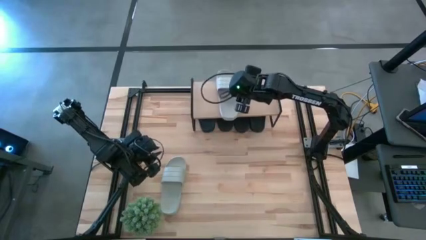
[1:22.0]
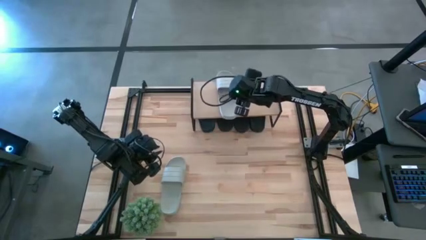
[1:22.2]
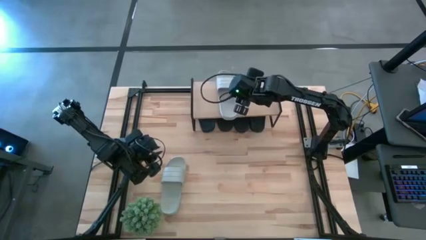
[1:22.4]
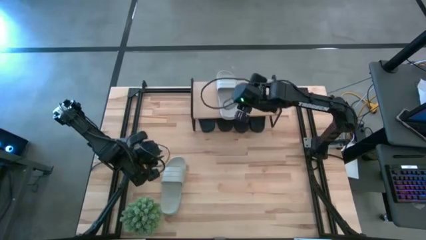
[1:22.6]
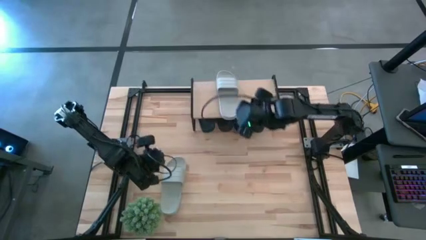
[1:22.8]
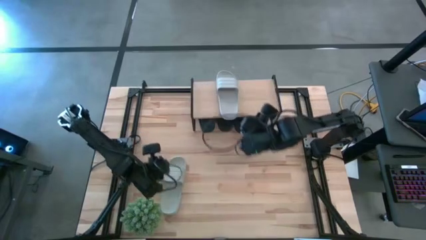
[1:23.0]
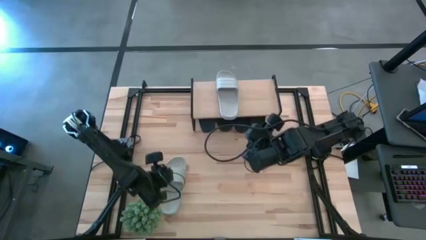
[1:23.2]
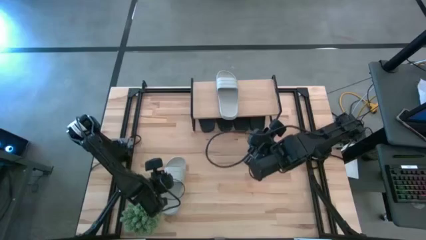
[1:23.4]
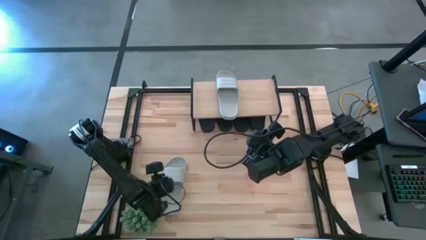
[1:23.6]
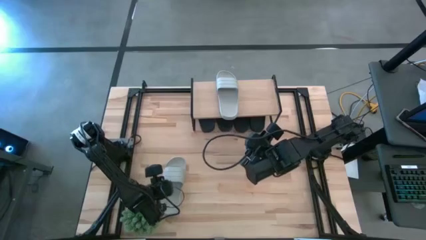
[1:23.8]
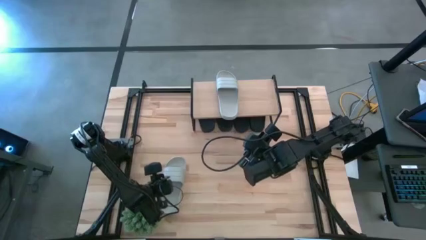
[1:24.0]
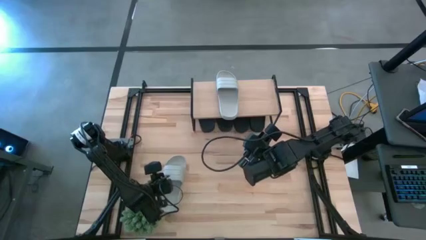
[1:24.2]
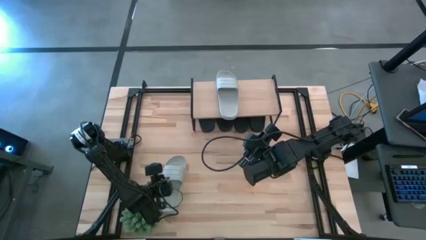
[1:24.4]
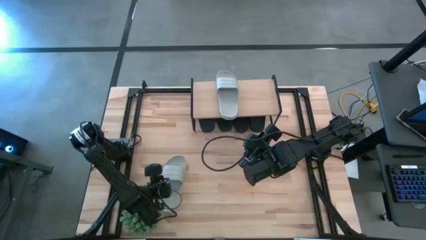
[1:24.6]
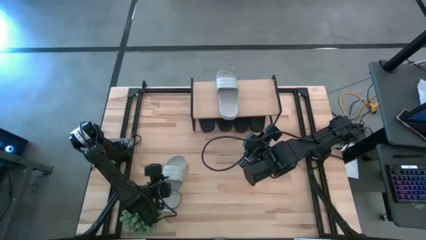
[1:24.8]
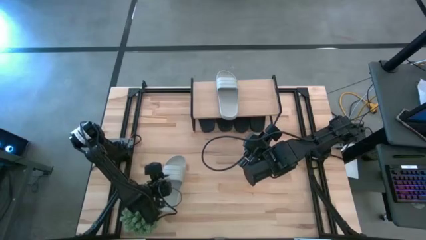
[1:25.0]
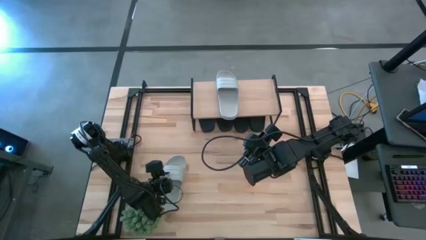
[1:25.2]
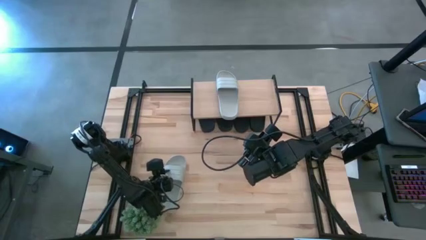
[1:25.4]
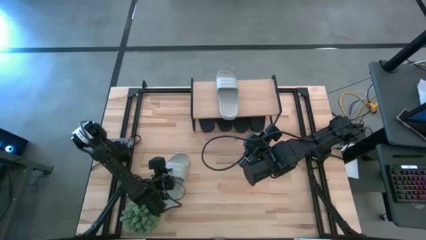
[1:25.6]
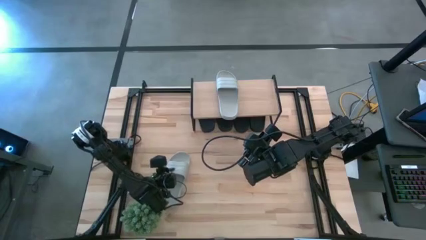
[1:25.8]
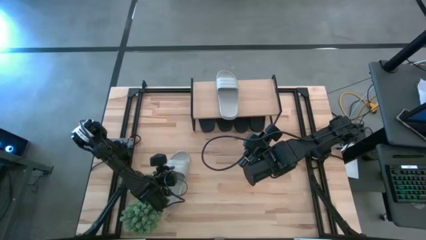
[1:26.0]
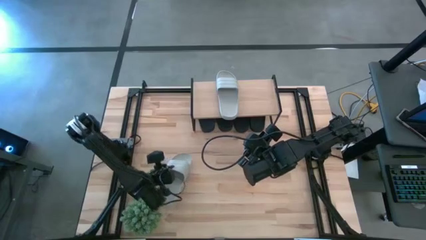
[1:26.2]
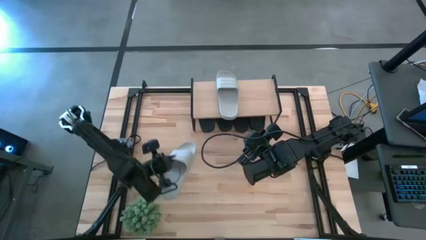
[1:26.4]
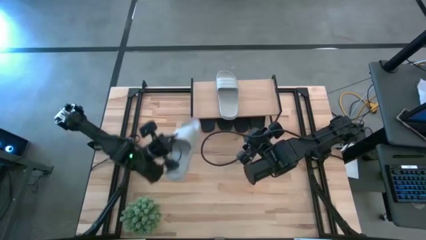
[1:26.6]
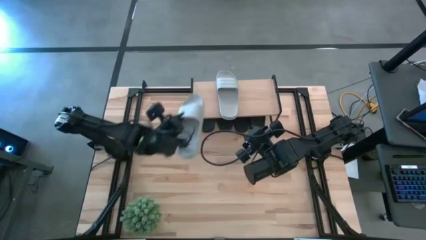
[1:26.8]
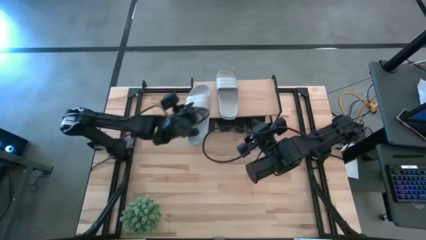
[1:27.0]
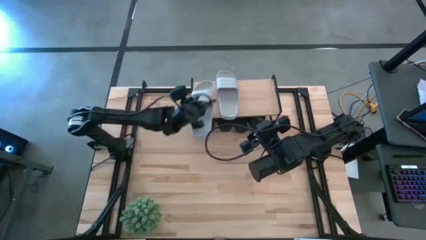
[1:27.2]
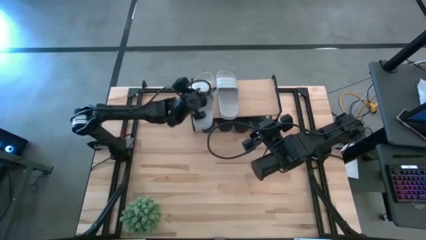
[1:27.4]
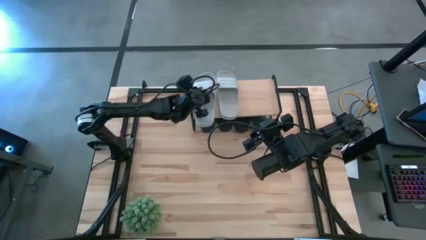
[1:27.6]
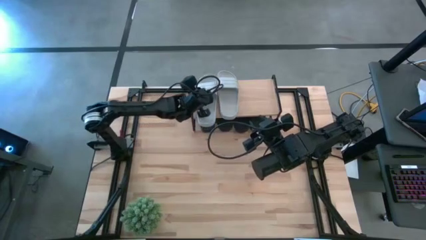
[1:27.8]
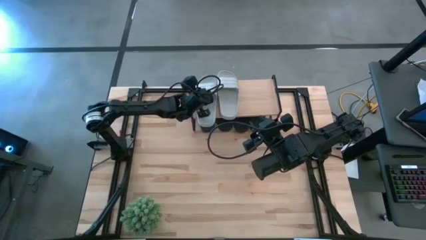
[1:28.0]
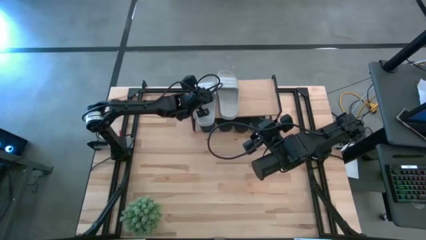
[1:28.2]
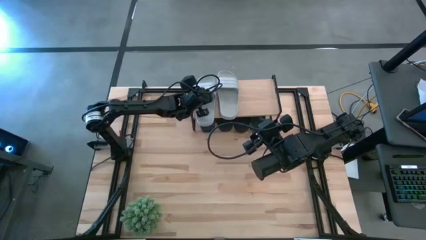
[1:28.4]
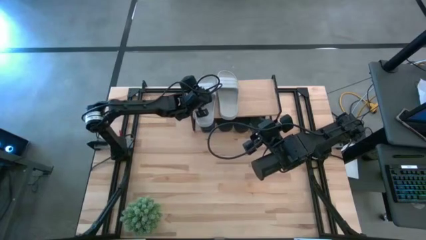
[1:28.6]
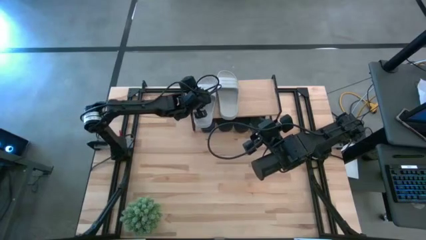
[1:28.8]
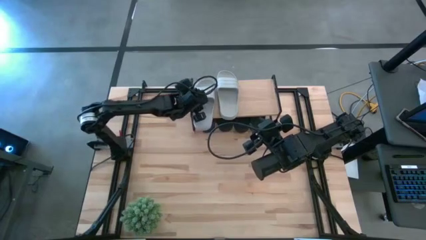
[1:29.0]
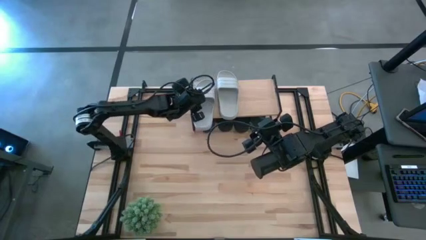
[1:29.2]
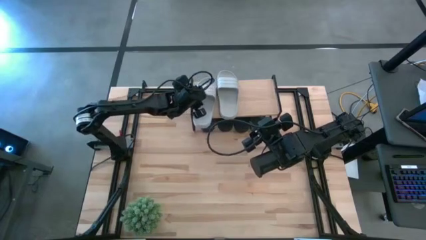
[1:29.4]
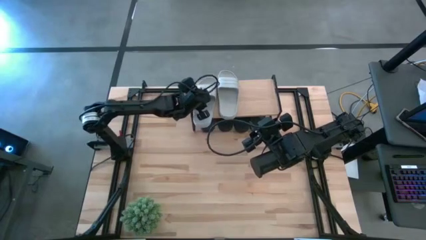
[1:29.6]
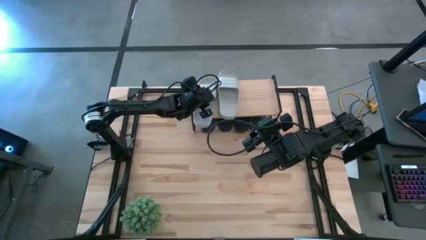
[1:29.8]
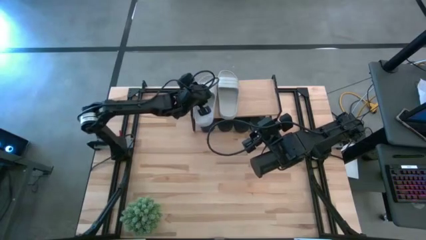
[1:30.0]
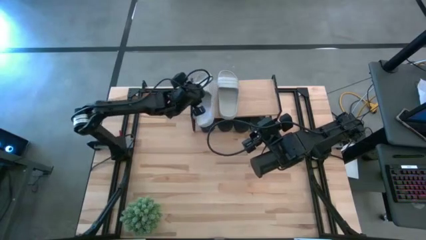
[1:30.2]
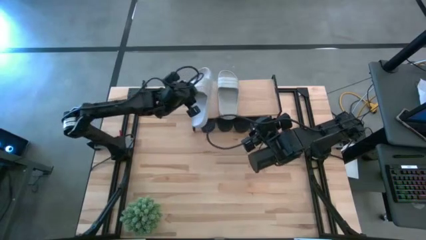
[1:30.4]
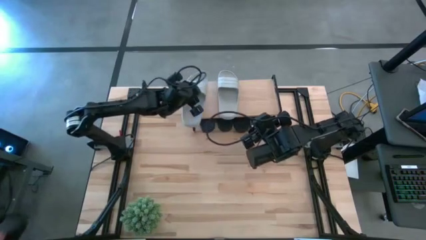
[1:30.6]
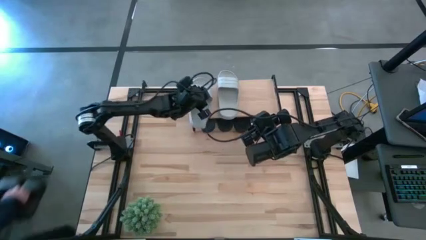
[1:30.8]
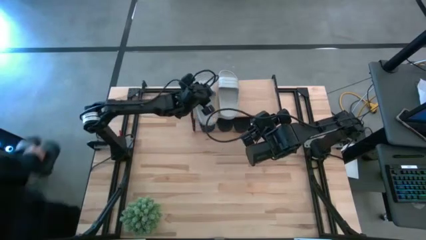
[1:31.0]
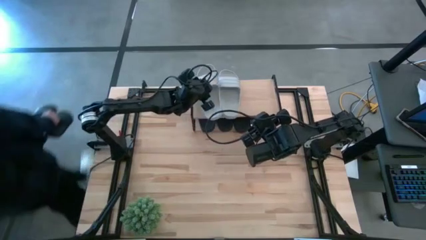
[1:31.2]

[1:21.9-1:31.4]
Task: Pick and place slides into the shelf
Put the gray slide on the shelf

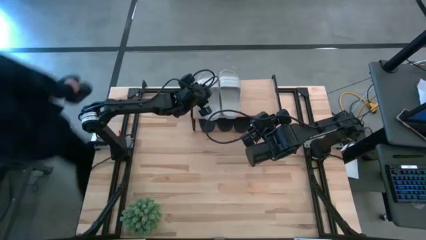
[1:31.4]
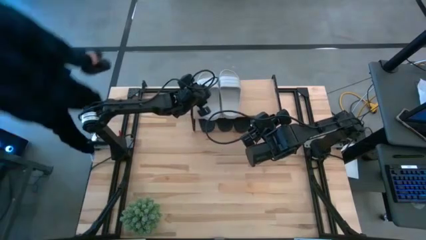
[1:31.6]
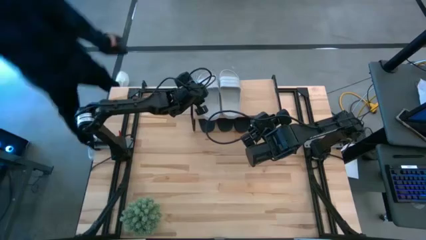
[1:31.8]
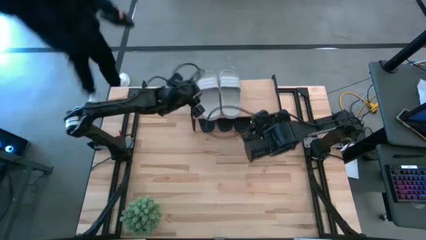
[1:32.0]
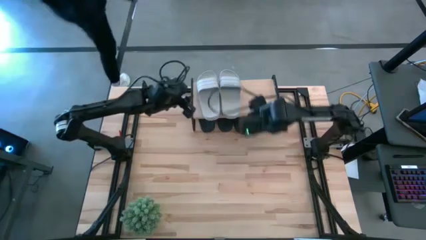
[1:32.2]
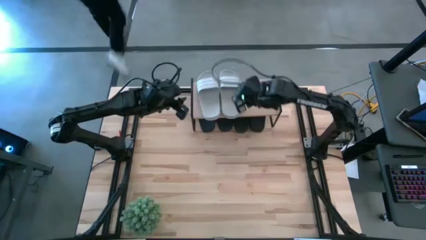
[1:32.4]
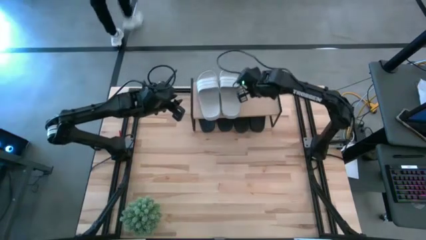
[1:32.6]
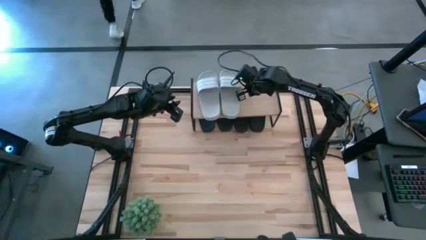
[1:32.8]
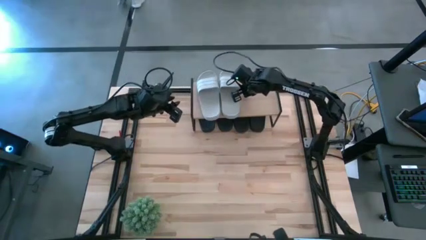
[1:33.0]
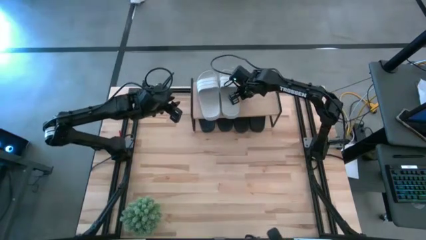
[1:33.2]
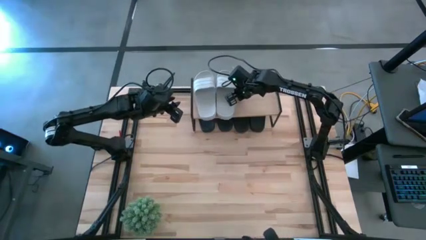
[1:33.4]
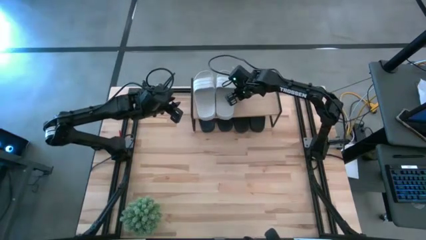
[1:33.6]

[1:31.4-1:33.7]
Adjust the gray slide on the shelf
